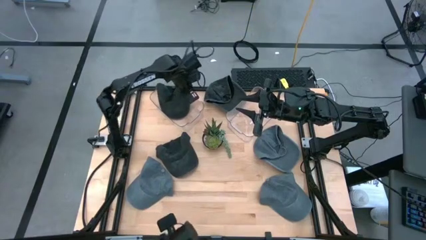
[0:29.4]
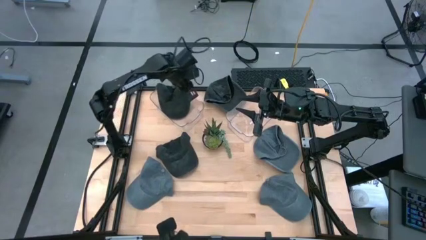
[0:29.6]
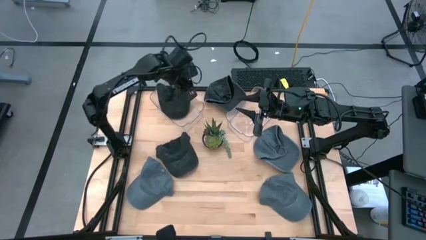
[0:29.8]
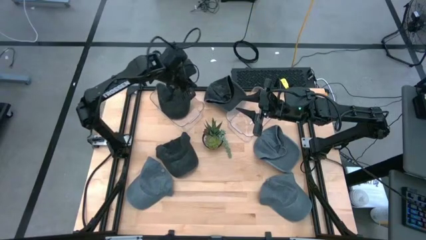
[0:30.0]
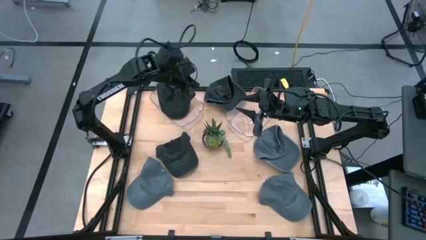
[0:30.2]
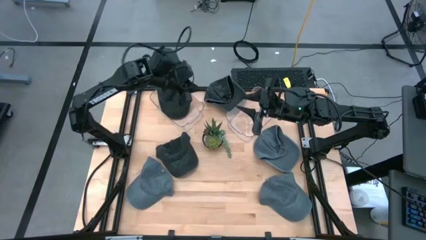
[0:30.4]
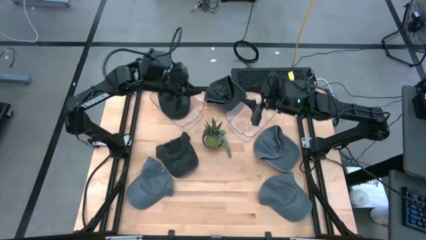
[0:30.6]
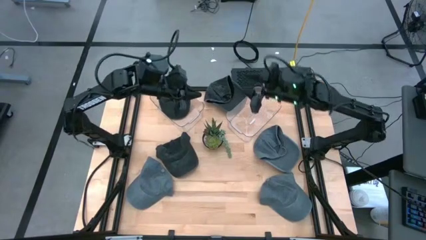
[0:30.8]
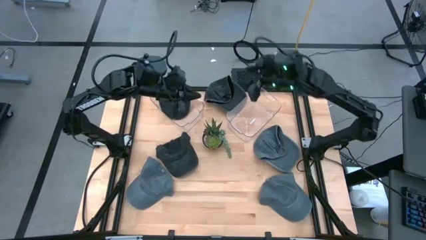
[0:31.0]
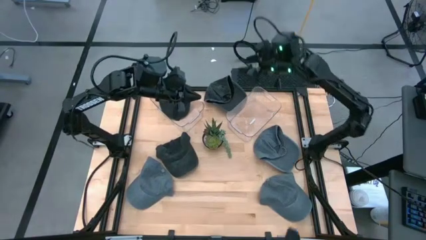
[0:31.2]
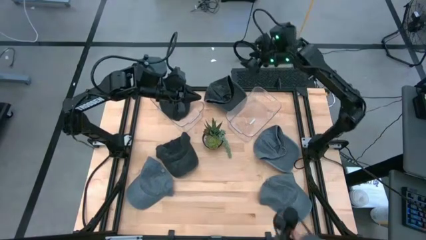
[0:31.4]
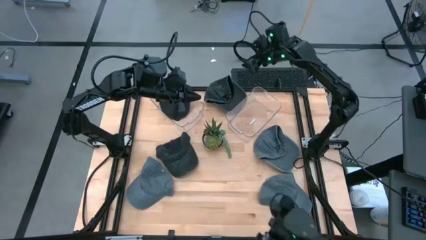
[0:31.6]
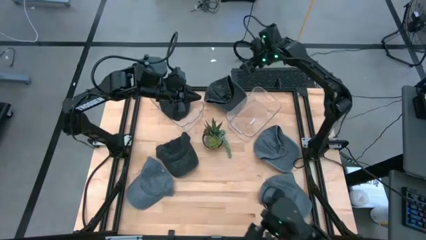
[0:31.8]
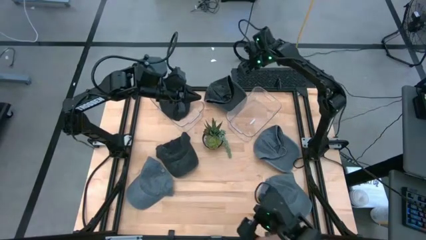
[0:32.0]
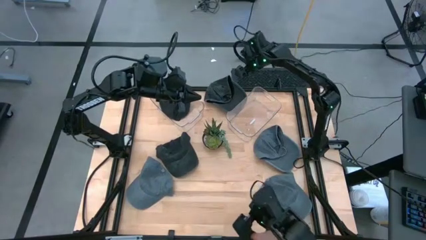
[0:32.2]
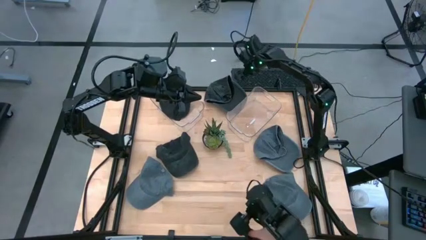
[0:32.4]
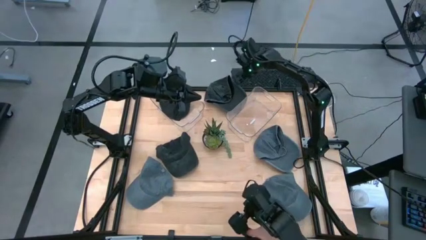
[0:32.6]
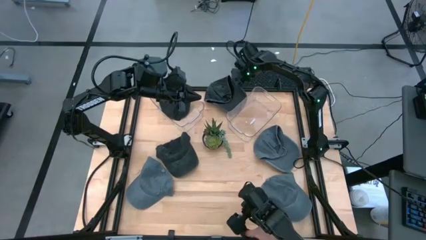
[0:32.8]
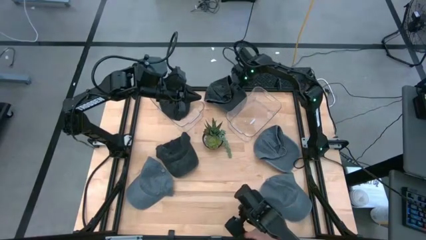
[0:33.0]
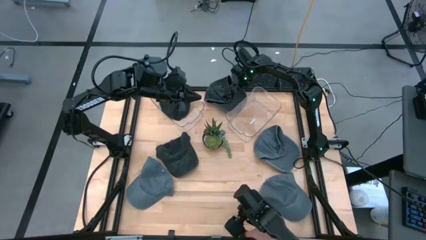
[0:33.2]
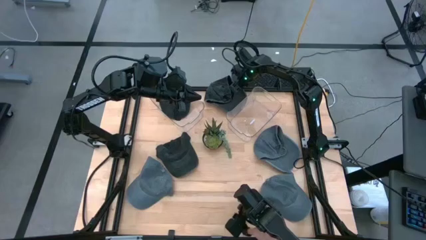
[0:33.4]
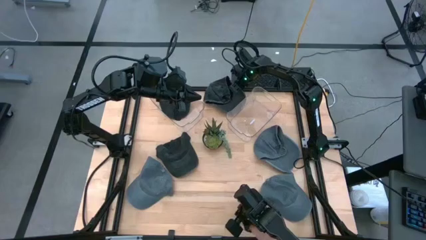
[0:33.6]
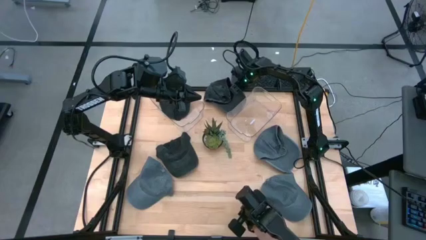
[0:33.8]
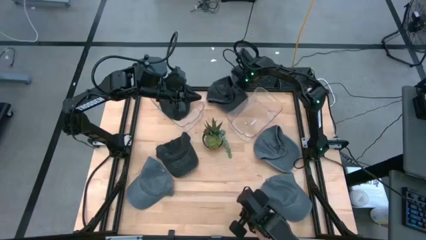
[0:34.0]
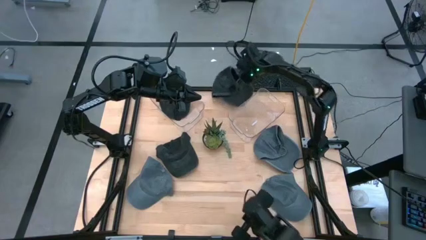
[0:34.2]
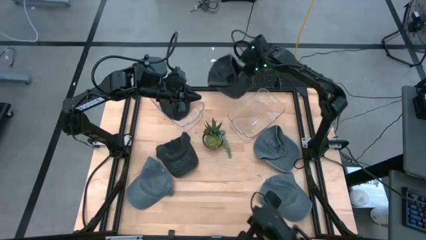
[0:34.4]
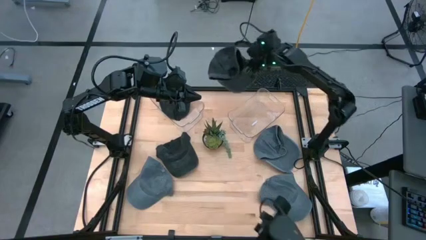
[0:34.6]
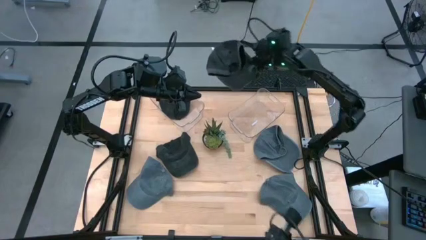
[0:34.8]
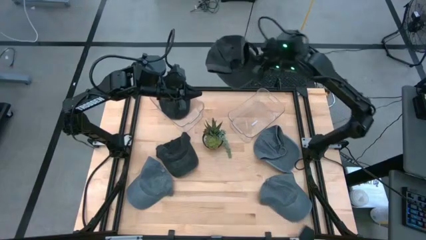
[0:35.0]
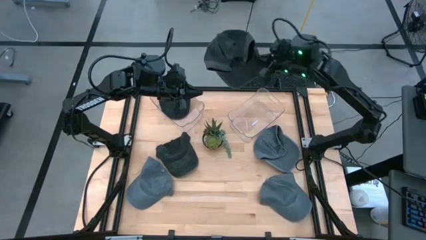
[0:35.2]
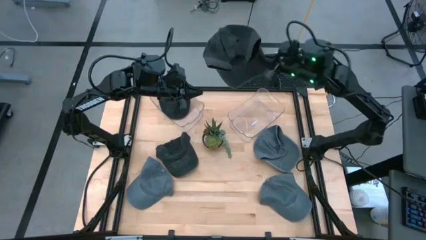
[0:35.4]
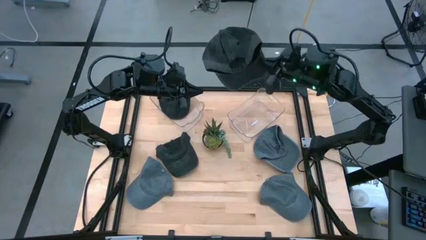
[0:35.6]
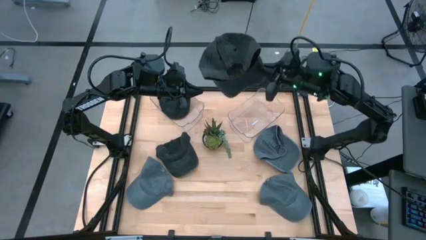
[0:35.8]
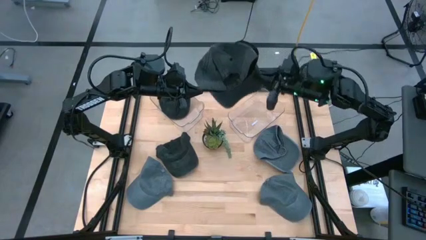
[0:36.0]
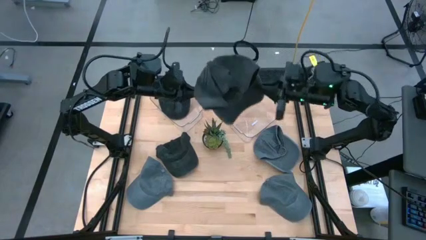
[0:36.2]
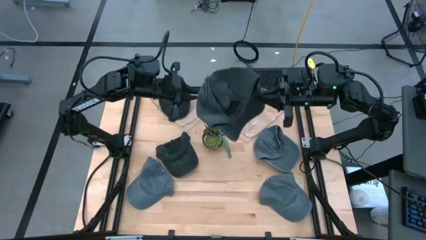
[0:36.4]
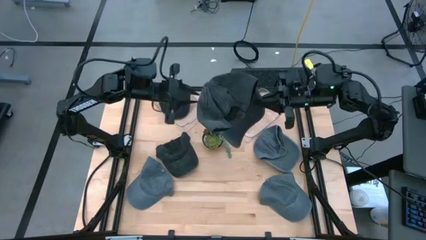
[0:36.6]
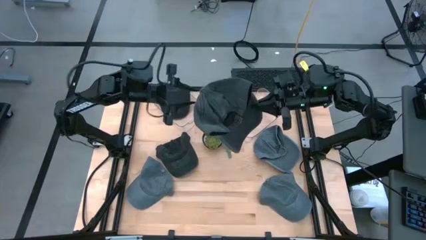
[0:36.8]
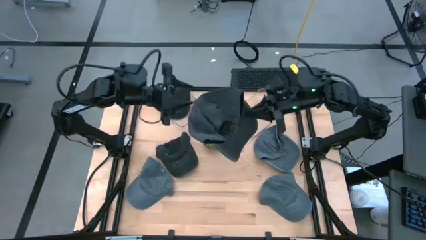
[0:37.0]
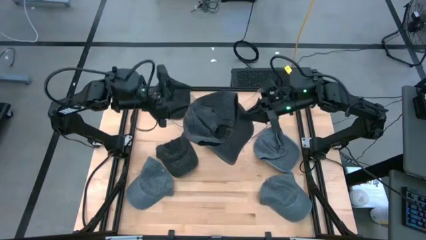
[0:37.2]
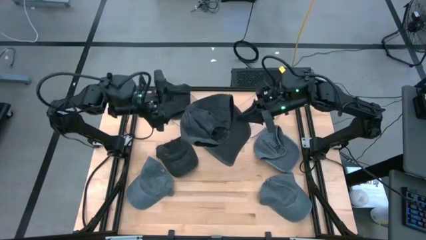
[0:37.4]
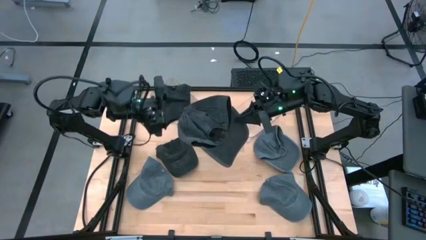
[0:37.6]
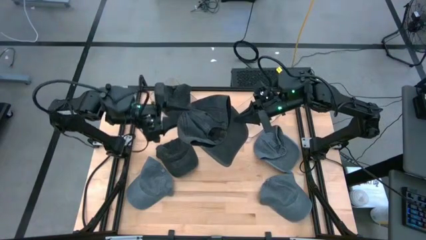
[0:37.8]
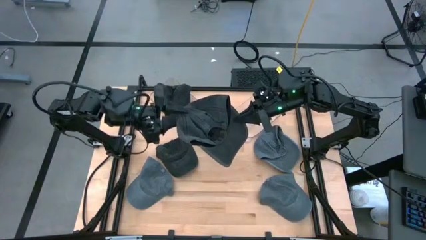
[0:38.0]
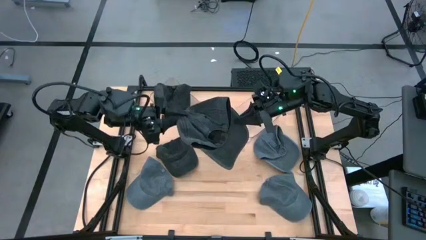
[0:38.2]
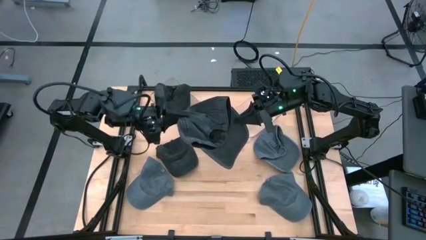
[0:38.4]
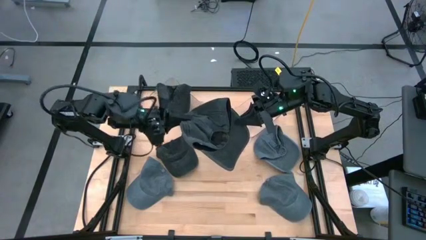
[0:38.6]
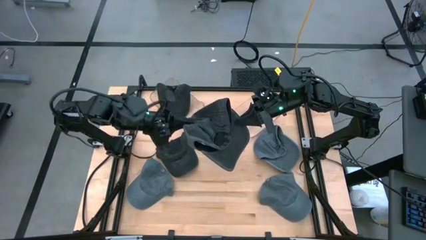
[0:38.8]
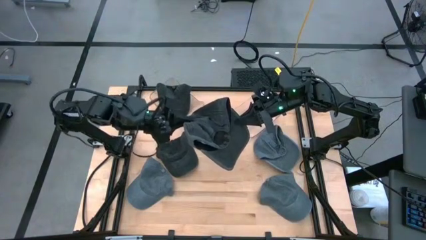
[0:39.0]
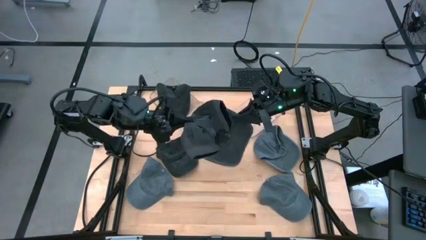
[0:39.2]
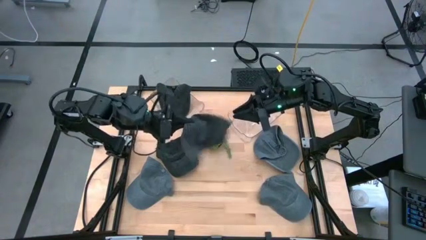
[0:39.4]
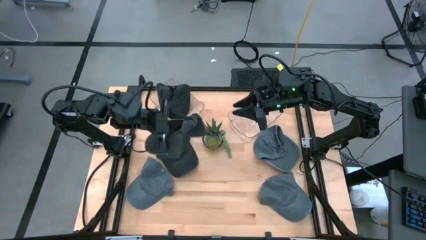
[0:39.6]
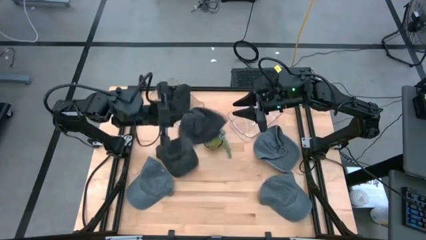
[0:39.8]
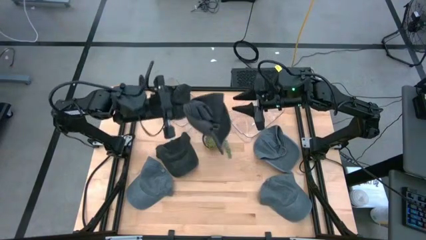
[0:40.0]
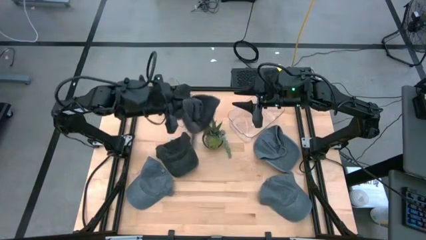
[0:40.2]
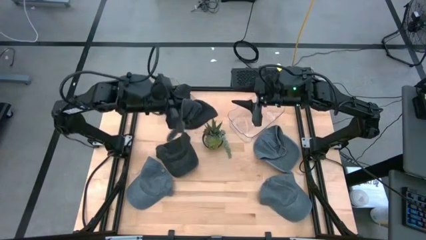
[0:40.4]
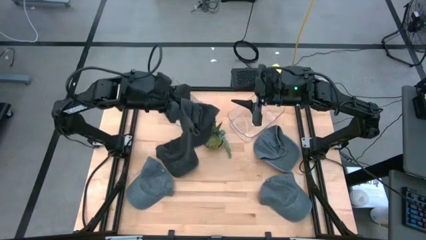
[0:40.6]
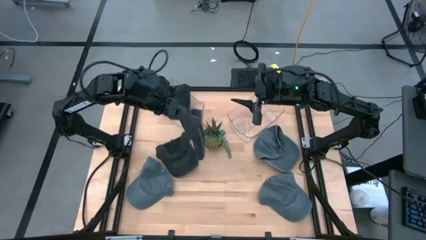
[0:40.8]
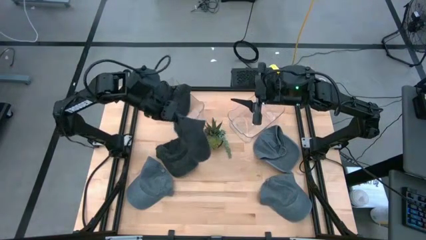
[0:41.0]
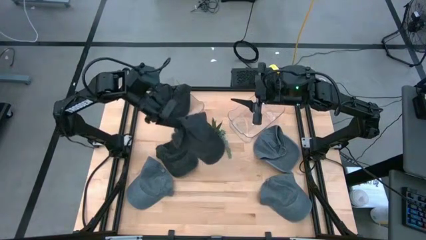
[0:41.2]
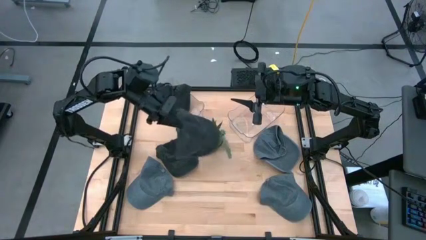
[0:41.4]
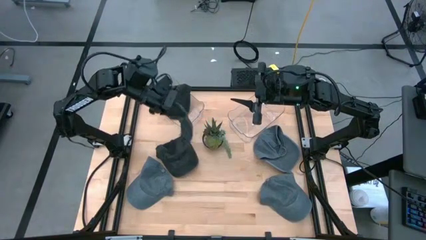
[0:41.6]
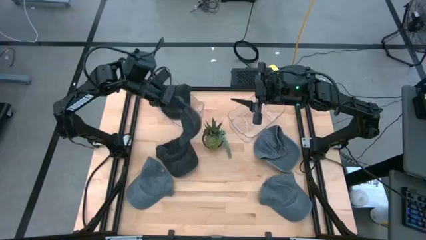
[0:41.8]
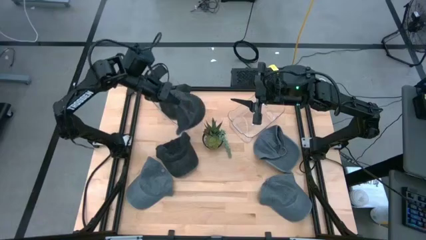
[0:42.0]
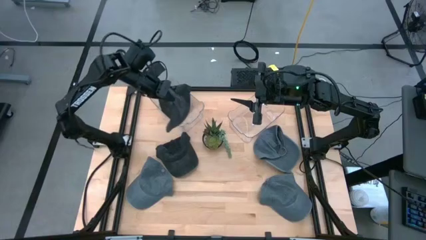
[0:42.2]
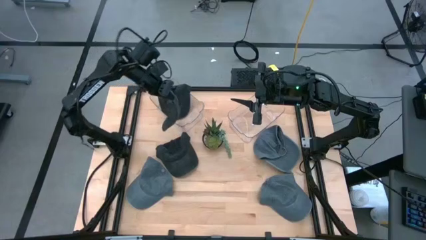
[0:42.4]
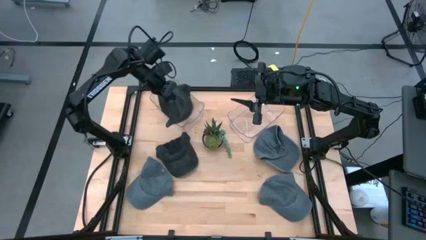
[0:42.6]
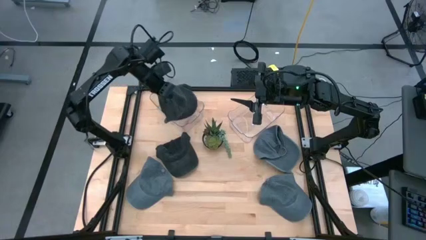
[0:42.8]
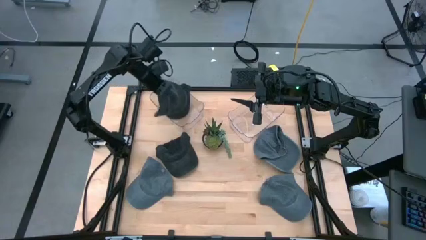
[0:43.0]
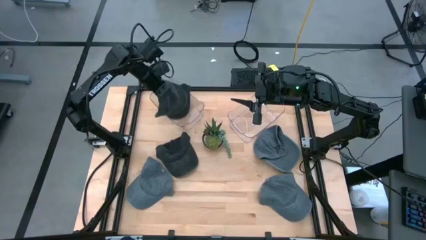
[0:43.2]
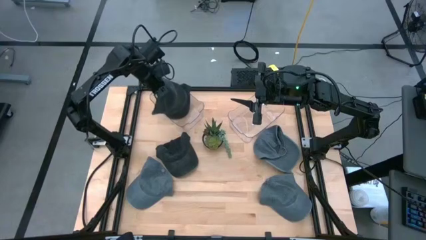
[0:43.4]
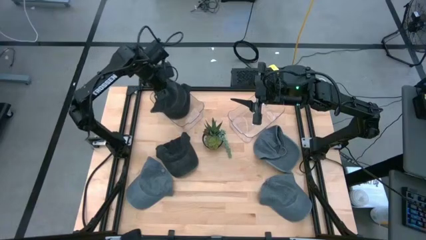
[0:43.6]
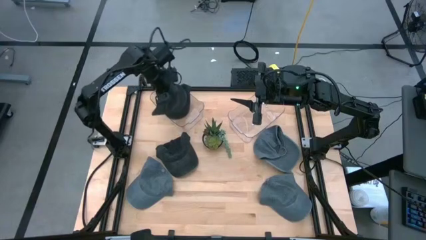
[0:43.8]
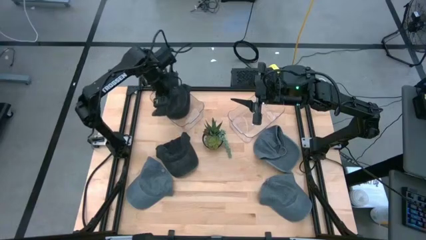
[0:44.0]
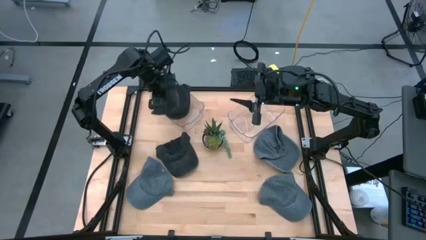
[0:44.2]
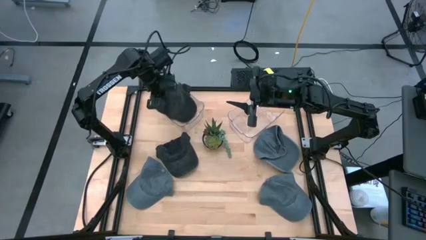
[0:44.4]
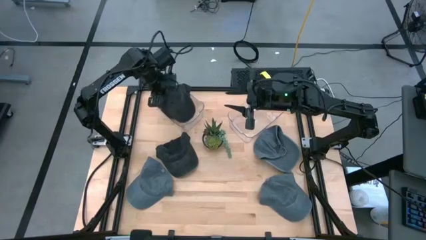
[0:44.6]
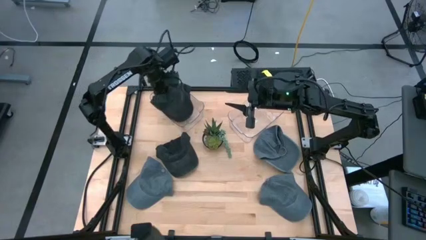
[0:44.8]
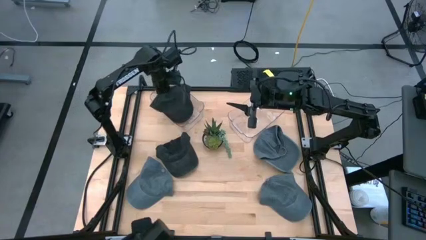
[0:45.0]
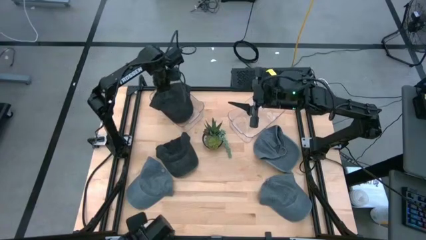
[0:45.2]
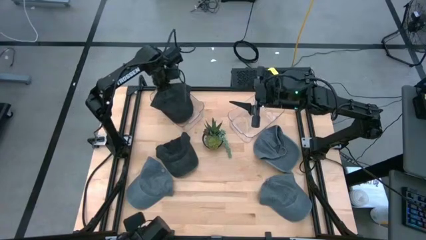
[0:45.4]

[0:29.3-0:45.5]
Task: Pick & Place hat
Put the top black cap into the left transparent bin
